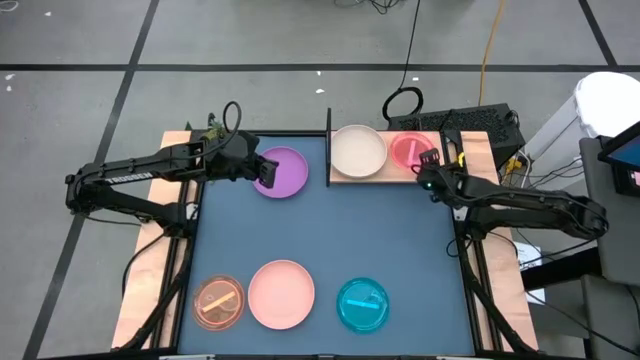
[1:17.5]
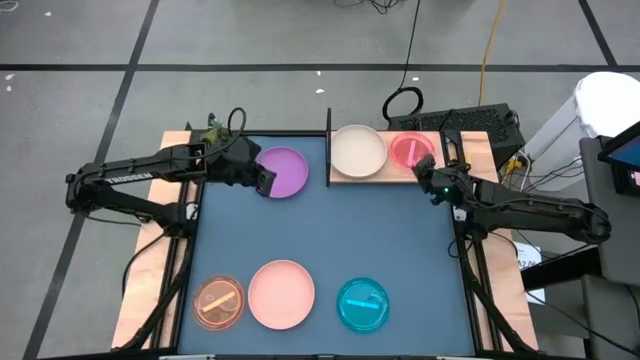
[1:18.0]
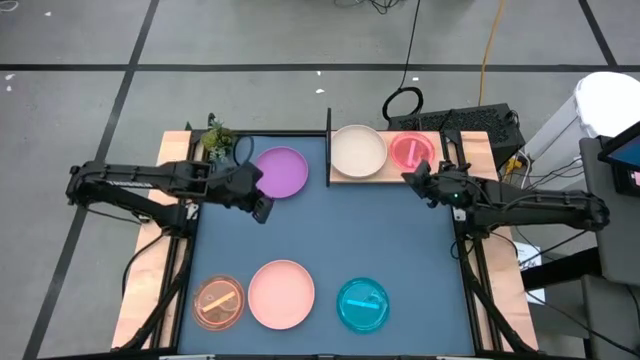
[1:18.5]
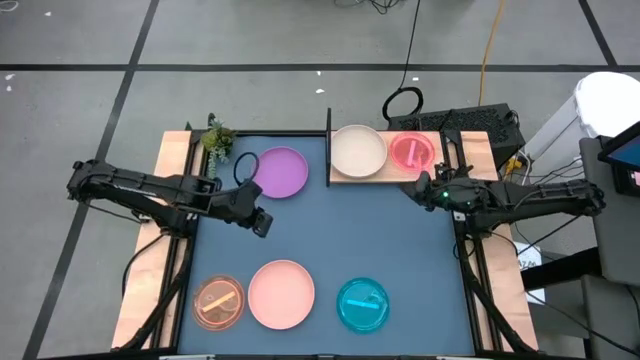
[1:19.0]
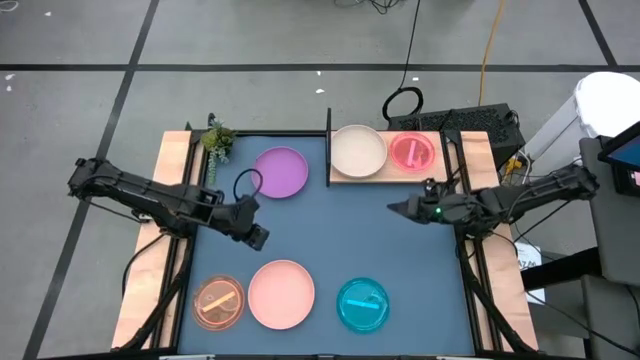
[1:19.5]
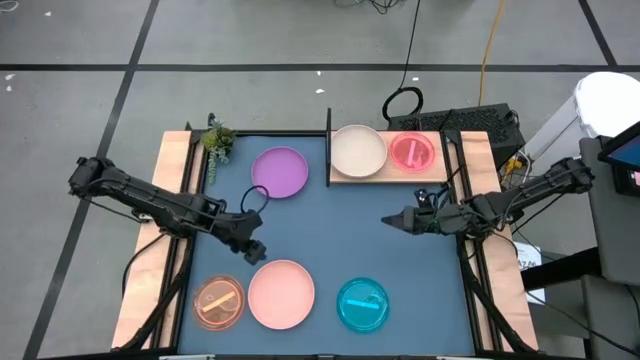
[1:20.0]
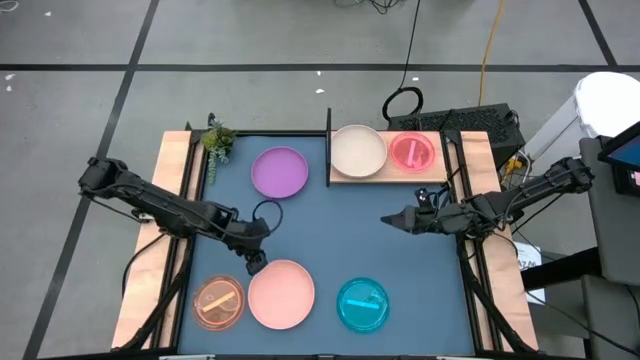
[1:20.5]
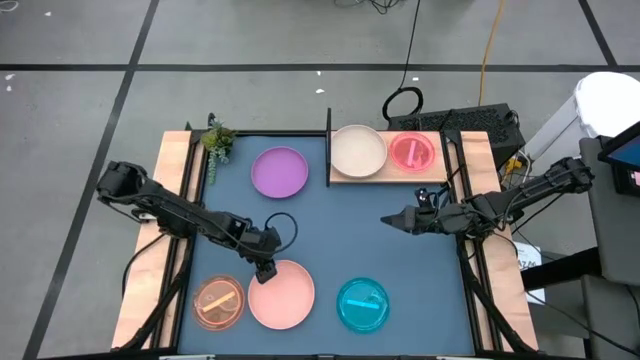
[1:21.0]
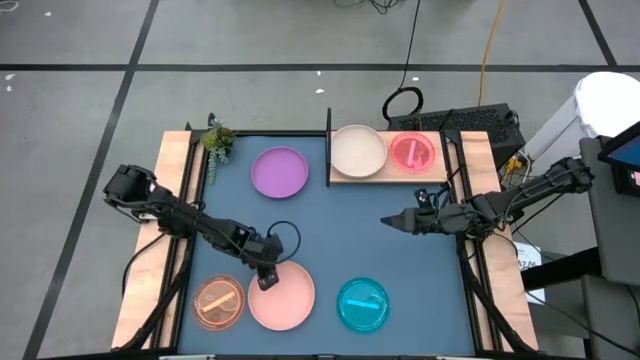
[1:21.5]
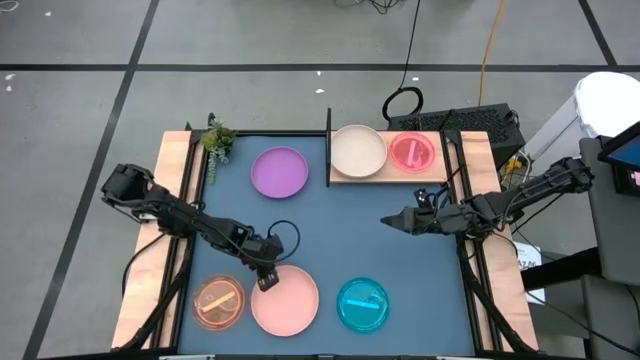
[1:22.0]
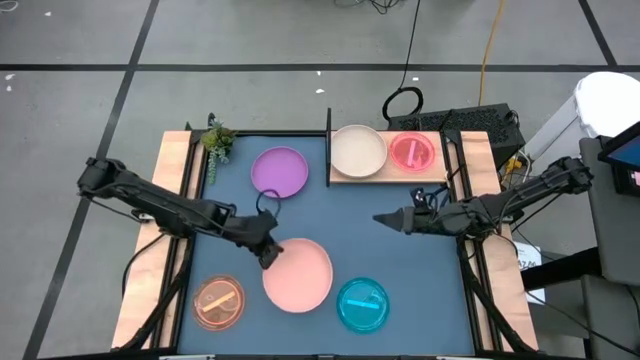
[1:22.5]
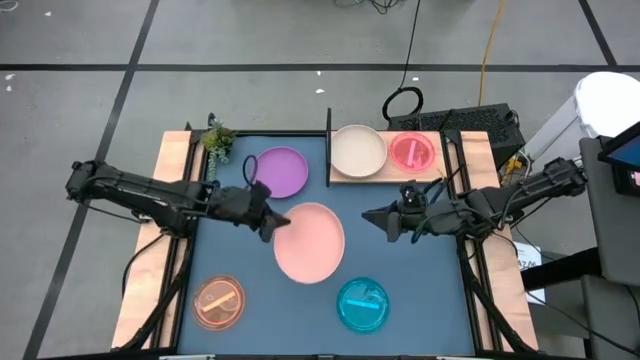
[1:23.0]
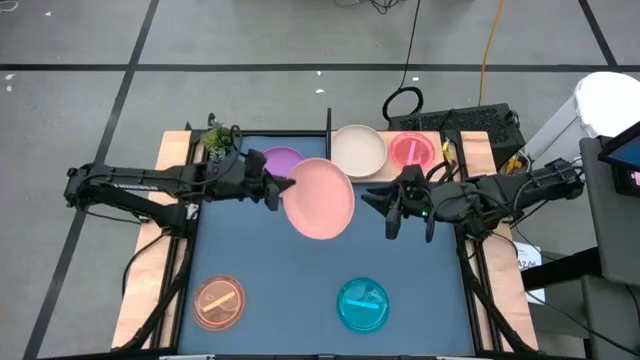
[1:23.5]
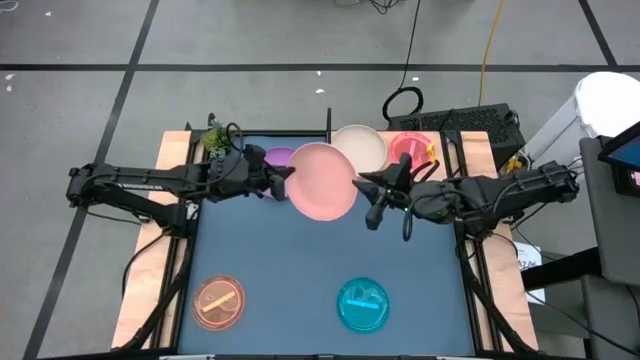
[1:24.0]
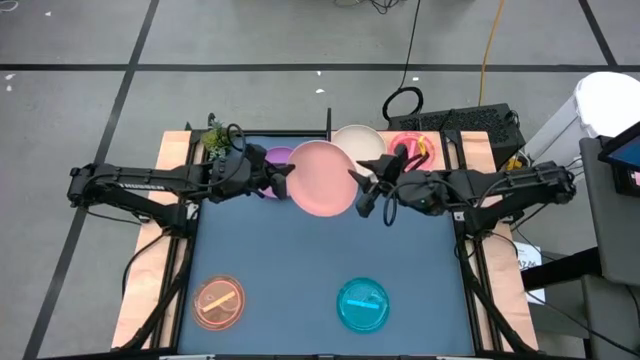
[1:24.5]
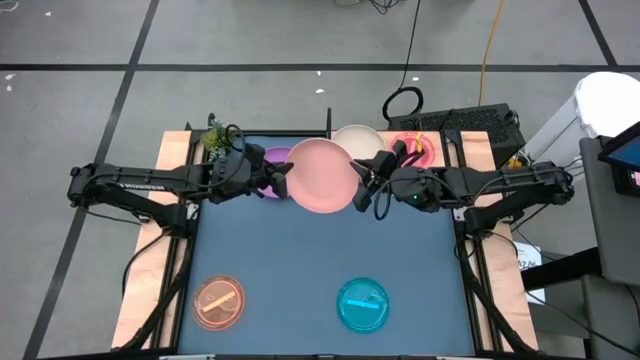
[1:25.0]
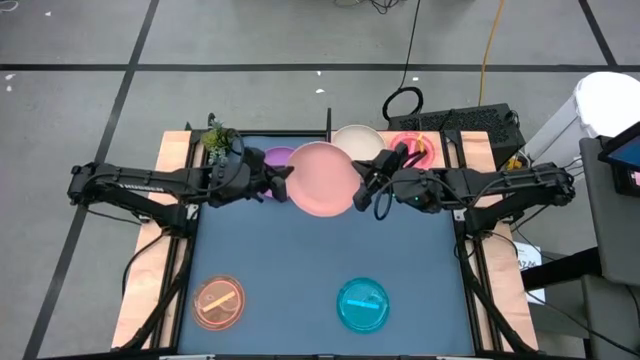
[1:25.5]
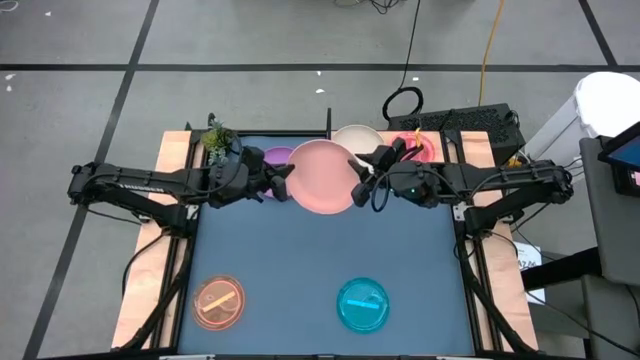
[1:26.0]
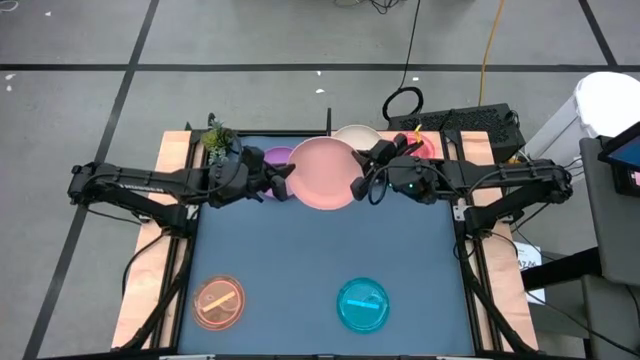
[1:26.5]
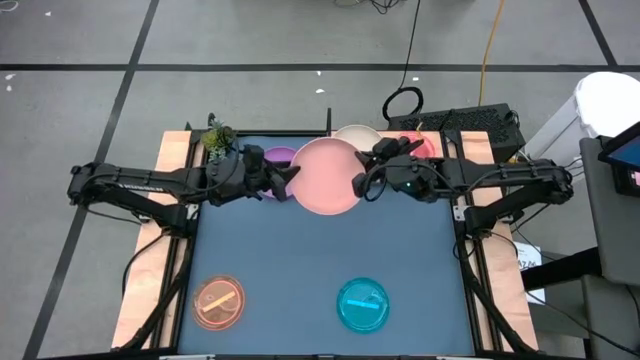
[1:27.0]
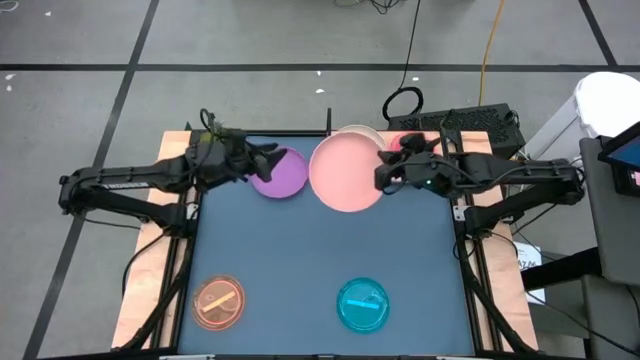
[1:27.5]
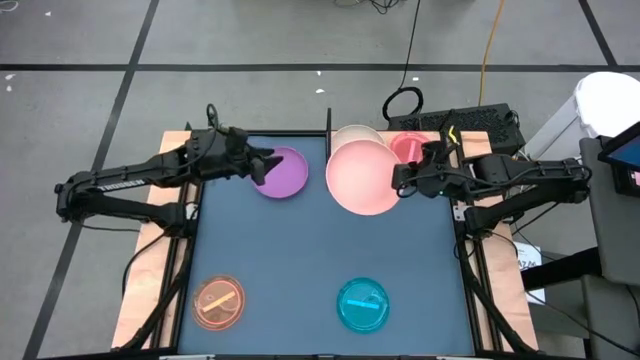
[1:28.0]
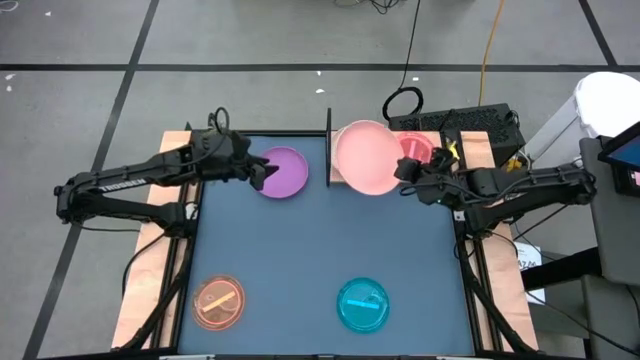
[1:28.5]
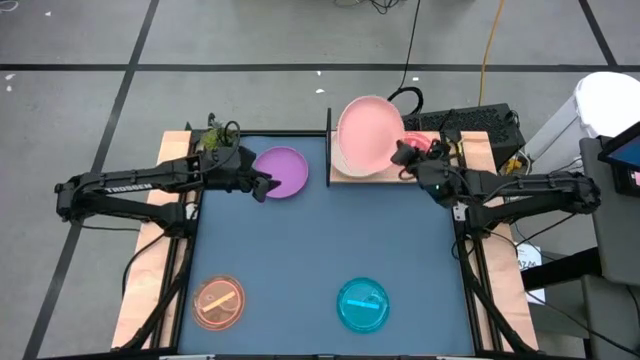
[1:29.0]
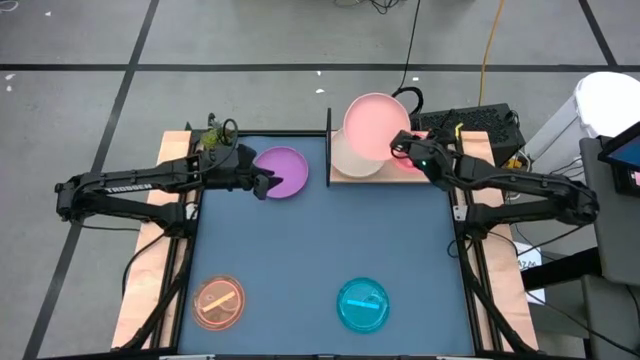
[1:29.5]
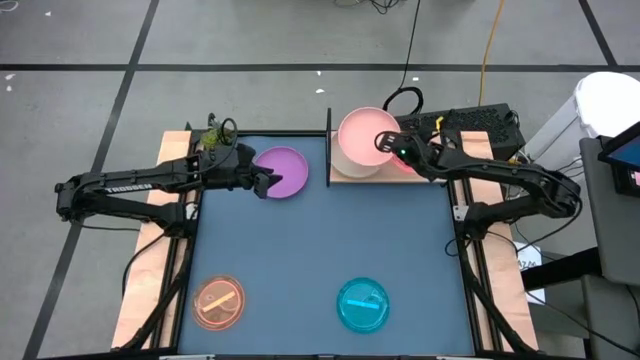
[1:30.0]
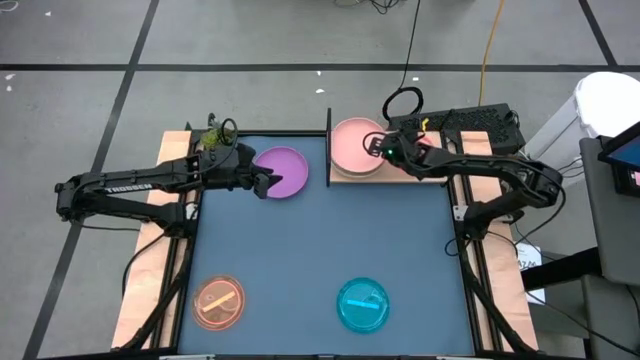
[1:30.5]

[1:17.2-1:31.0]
Task: Place and stack plates onto a shelf
Stack the orange plate on top of the white plate on the shelf

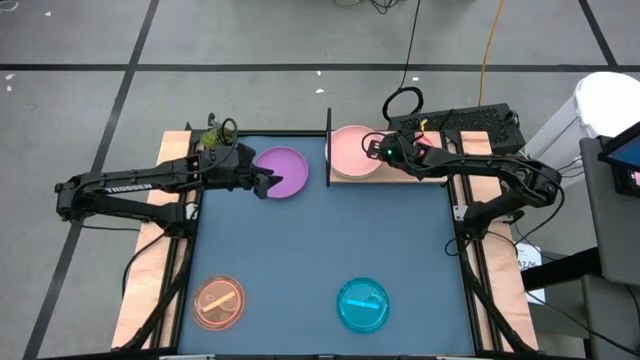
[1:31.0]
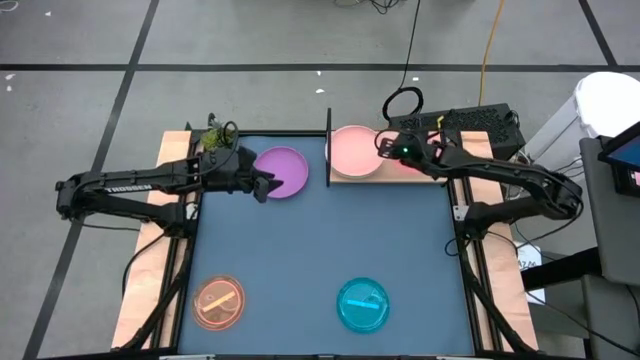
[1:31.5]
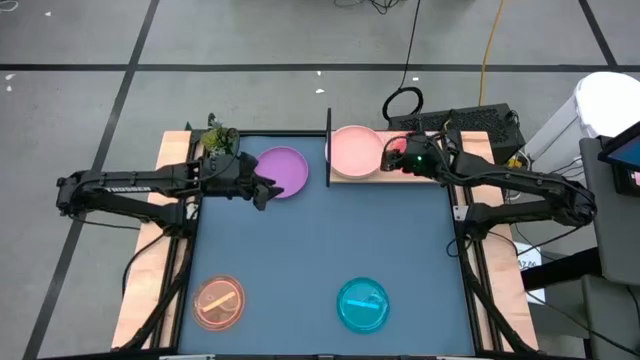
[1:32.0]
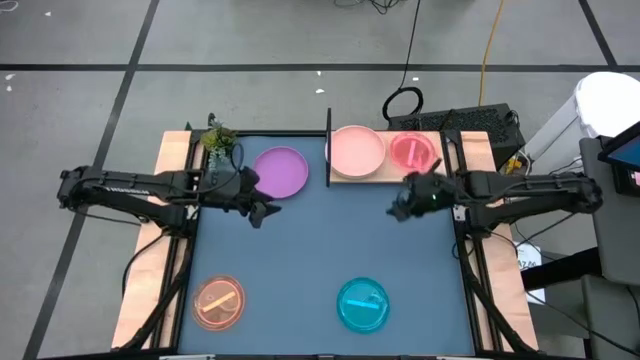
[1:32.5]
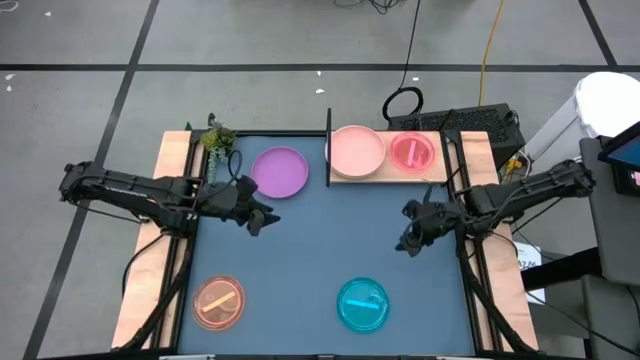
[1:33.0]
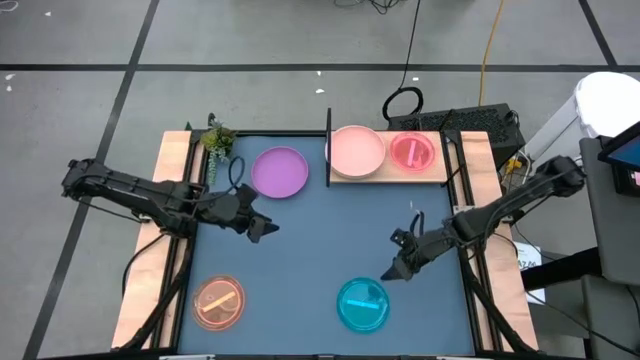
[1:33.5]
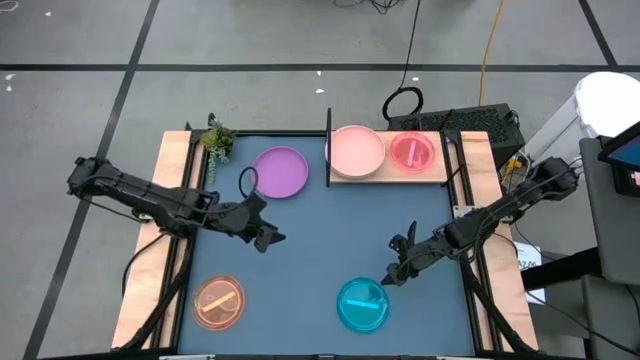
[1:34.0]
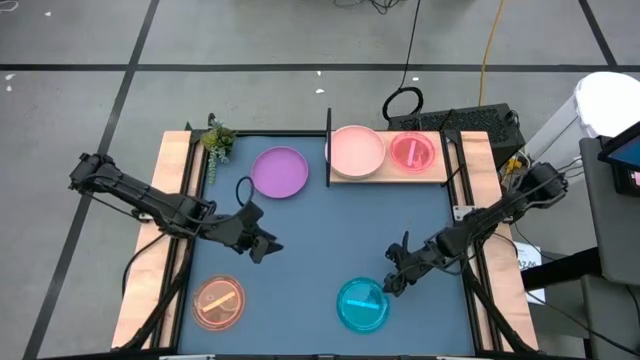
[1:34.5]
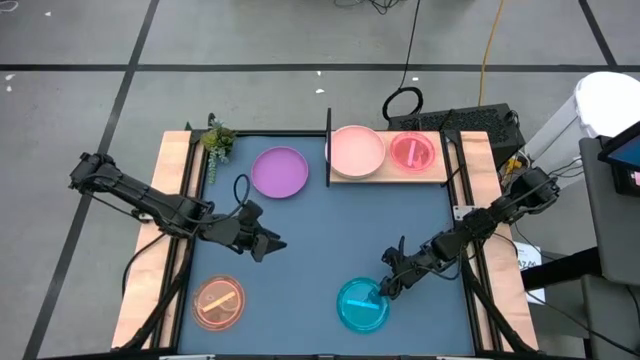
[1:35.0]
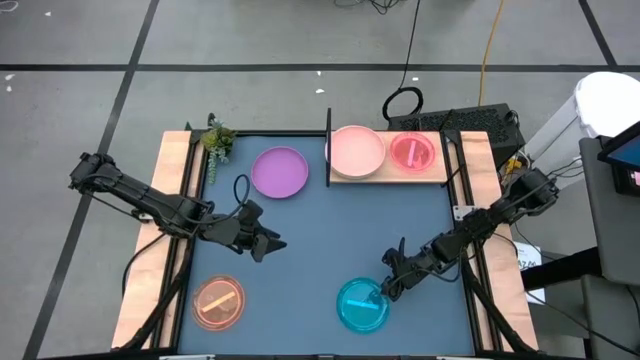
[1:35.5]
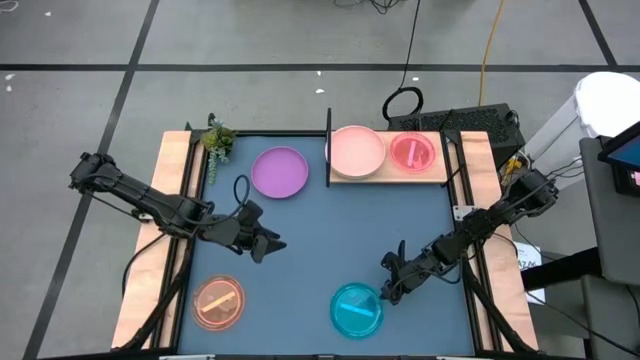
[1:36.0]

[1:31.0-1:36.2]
Stack the blue plate on top of the pink plate on the shelf

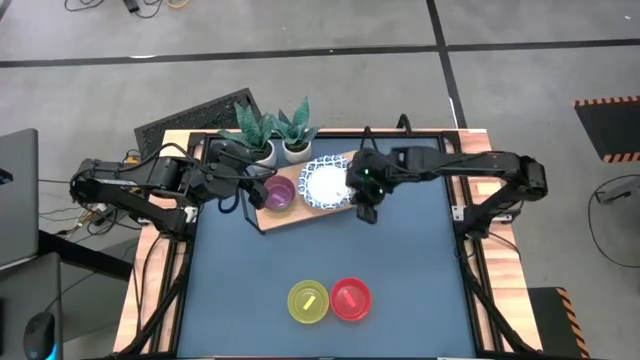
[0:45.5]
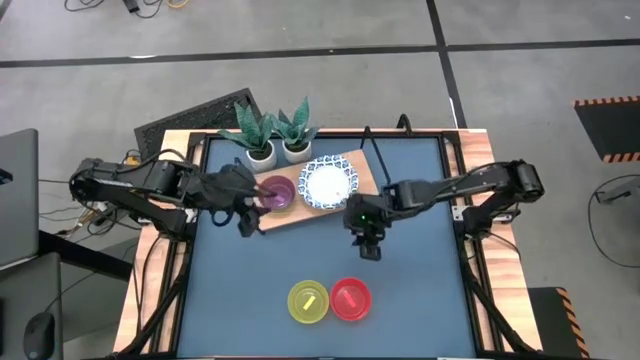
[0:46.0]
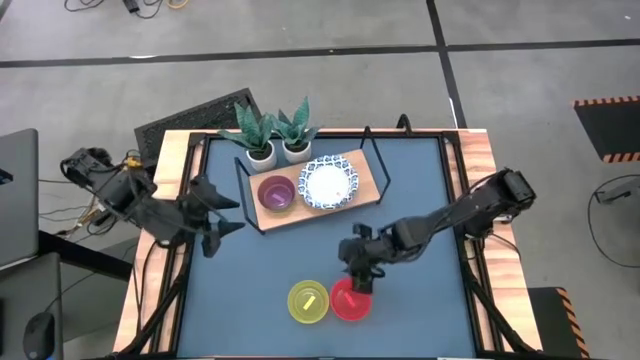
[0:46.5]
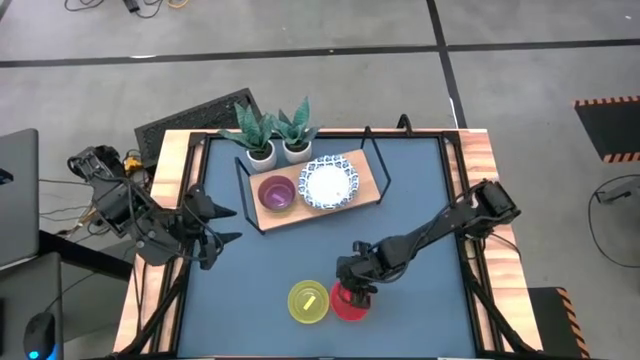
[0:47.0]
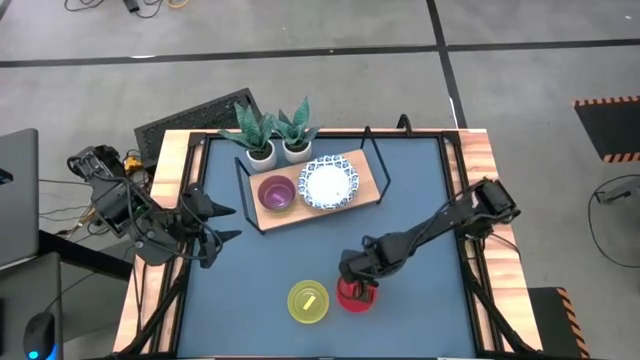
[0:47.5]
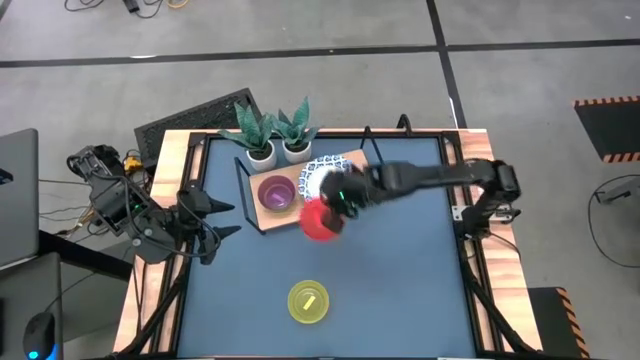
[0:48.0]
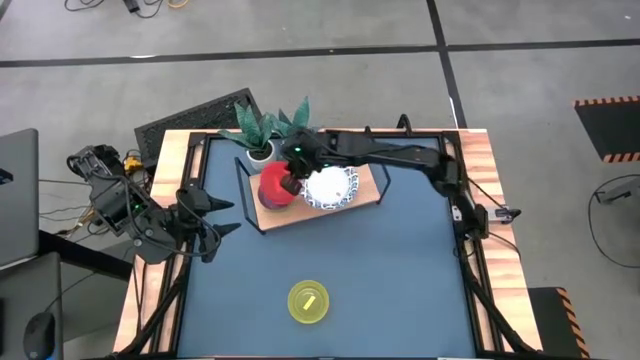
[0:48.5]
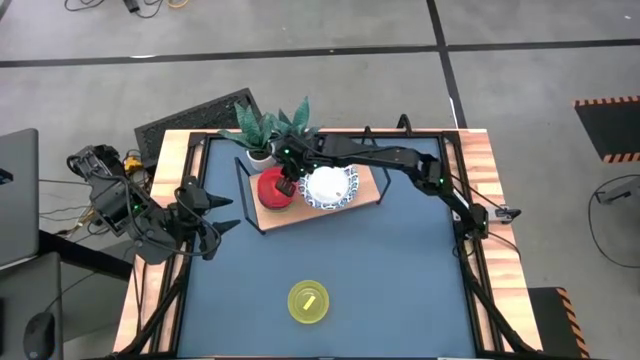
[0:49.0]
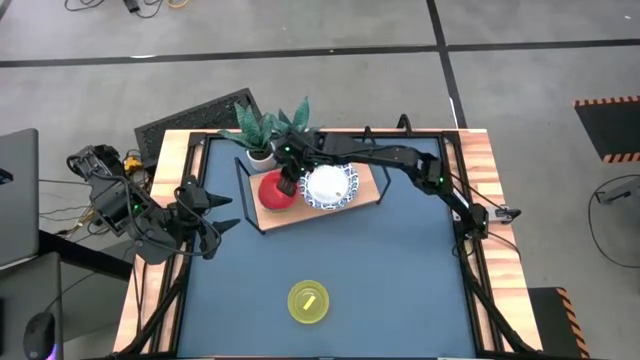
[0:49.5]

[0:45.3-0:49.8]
Task: Place and stack bowls onto a shelf
Stack the orange bowl on top of the purple bowl on the shelf
